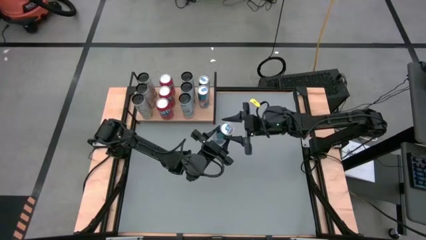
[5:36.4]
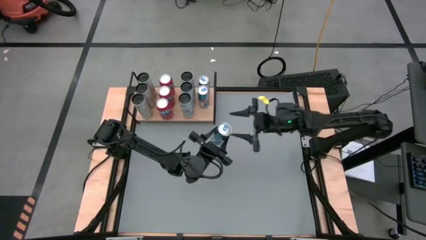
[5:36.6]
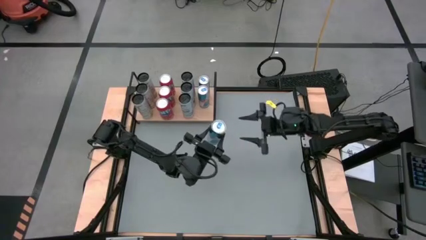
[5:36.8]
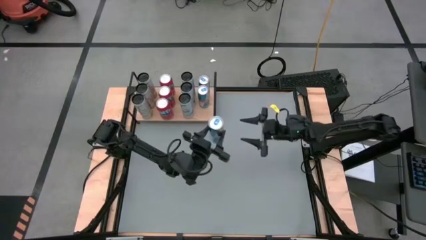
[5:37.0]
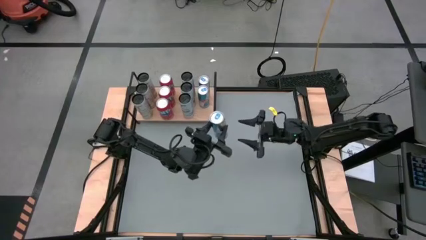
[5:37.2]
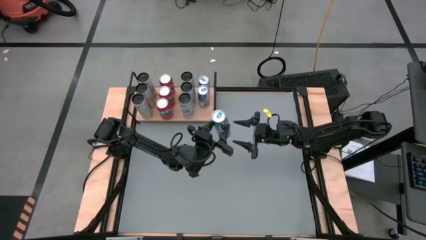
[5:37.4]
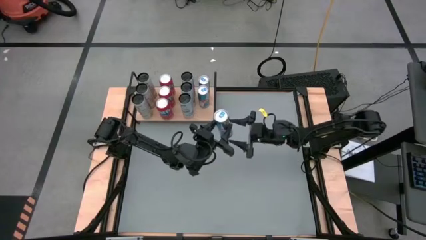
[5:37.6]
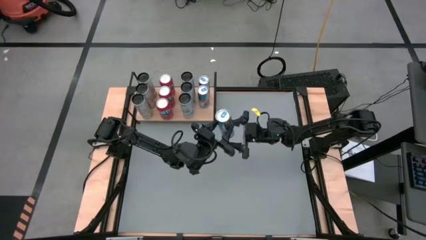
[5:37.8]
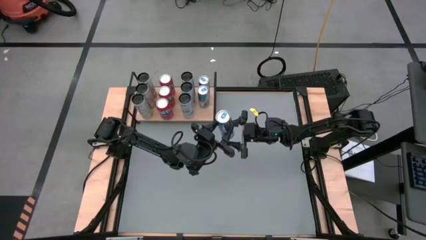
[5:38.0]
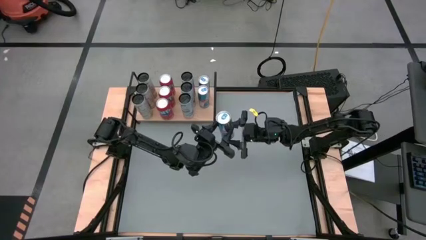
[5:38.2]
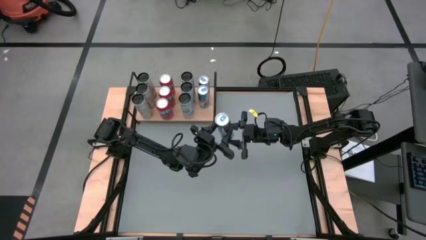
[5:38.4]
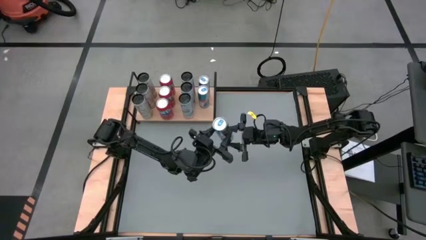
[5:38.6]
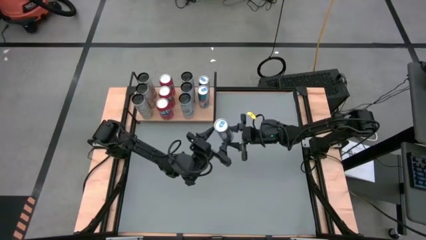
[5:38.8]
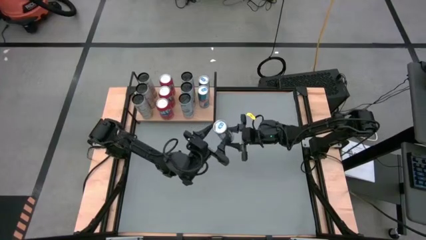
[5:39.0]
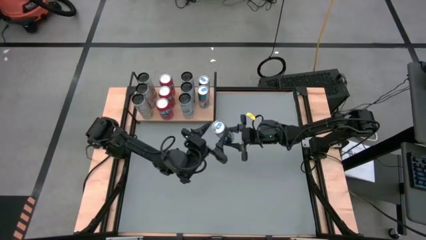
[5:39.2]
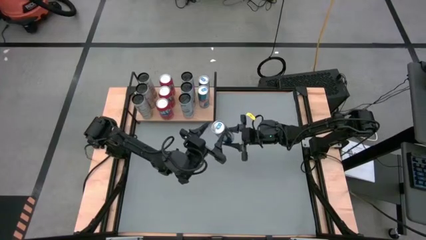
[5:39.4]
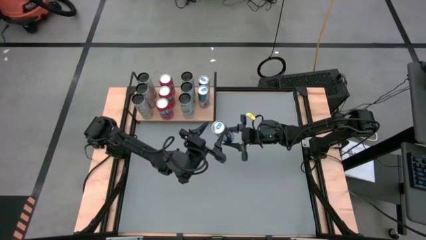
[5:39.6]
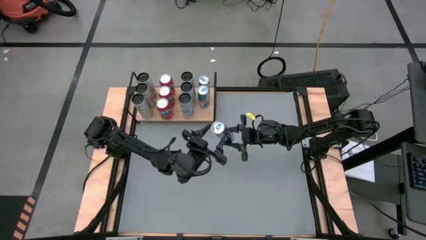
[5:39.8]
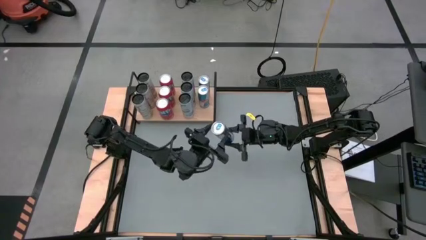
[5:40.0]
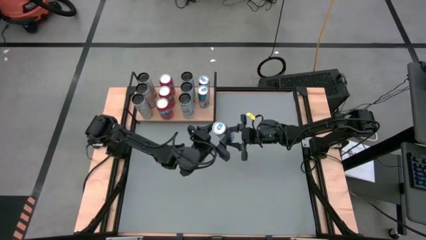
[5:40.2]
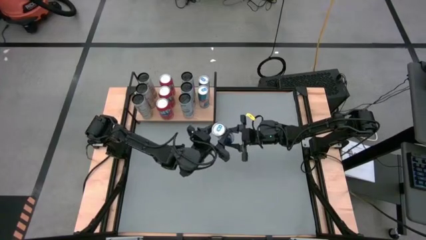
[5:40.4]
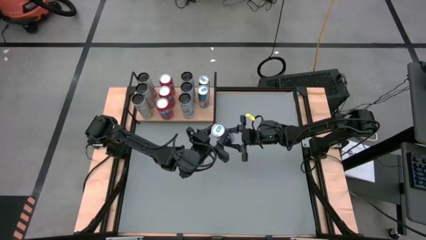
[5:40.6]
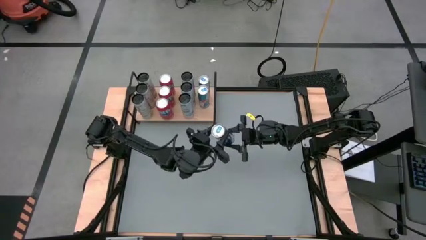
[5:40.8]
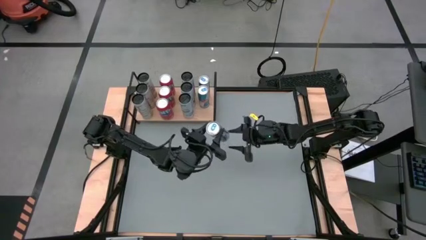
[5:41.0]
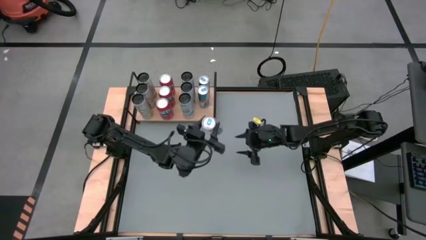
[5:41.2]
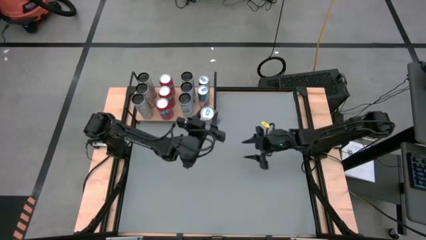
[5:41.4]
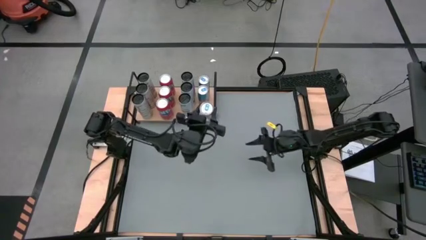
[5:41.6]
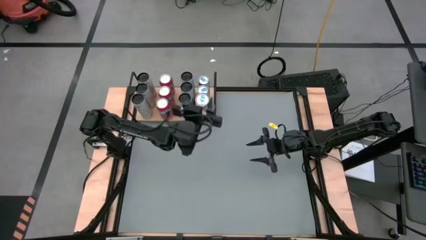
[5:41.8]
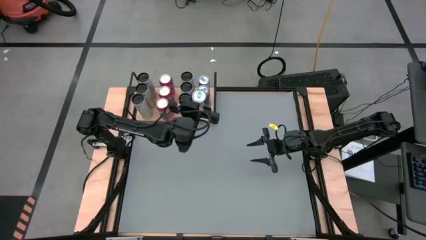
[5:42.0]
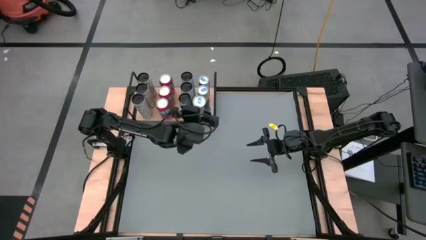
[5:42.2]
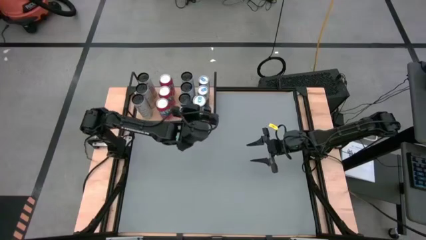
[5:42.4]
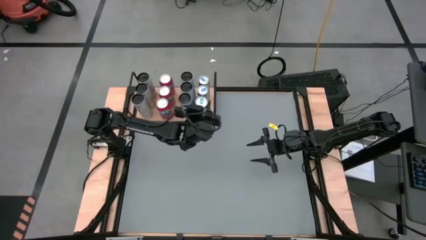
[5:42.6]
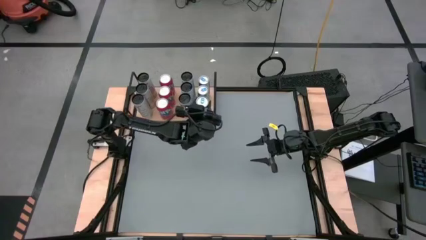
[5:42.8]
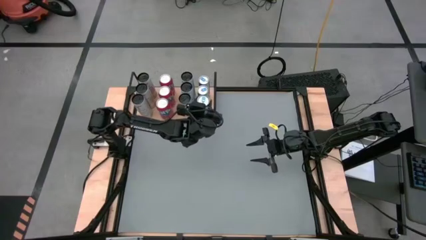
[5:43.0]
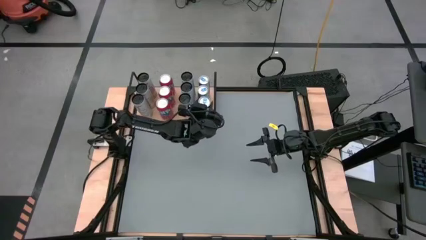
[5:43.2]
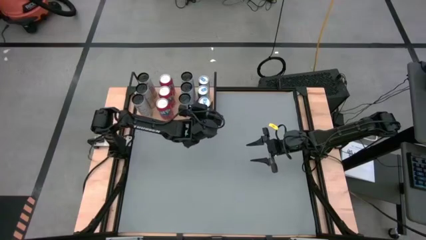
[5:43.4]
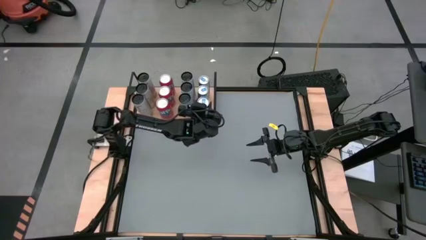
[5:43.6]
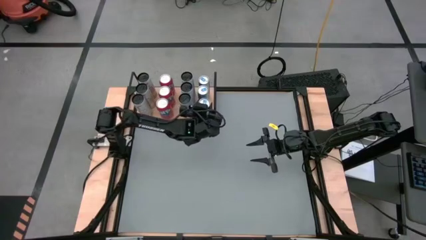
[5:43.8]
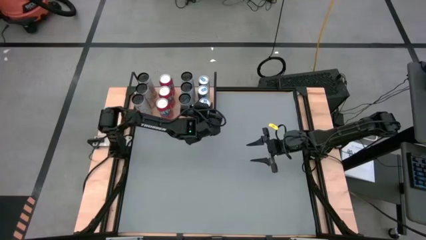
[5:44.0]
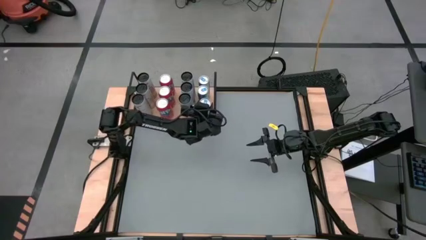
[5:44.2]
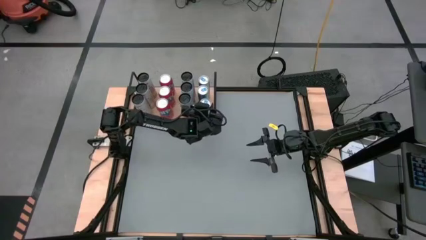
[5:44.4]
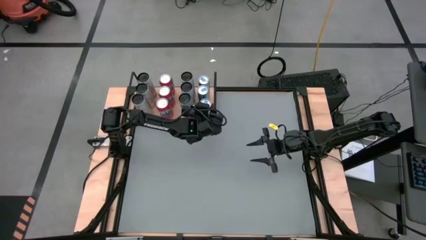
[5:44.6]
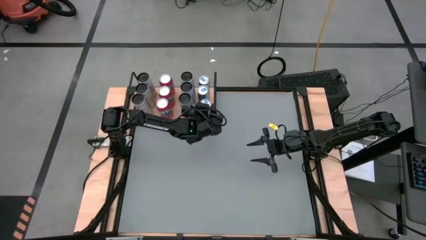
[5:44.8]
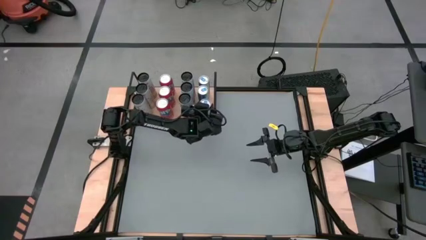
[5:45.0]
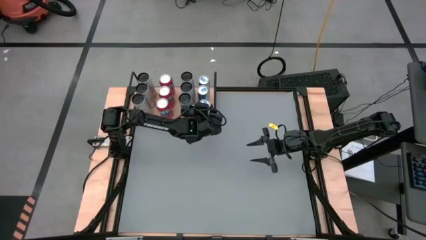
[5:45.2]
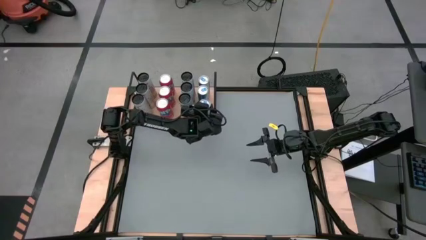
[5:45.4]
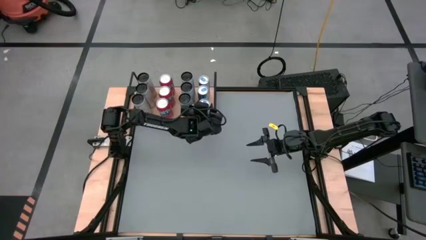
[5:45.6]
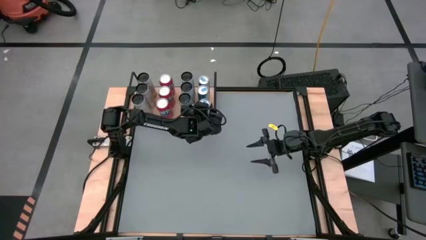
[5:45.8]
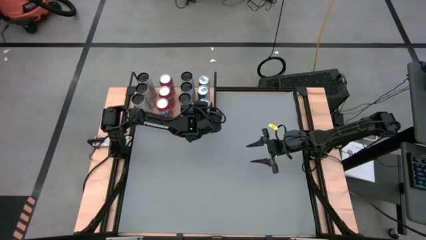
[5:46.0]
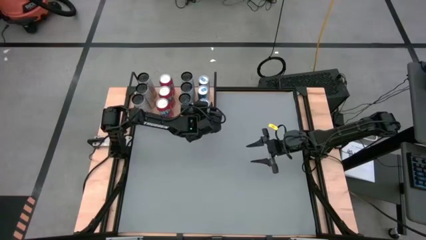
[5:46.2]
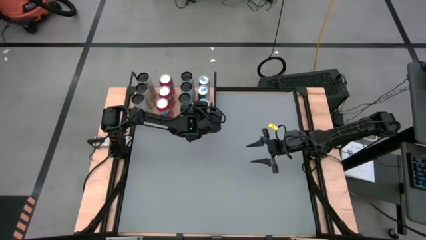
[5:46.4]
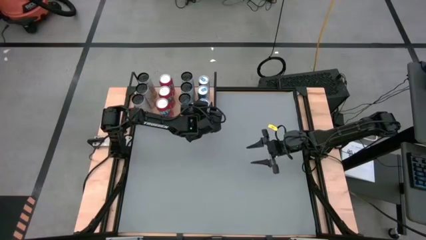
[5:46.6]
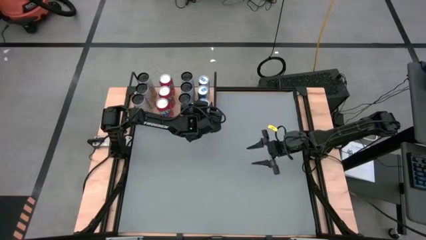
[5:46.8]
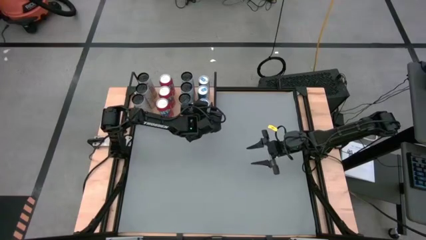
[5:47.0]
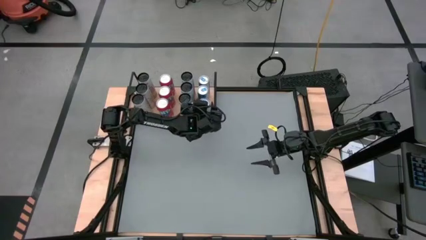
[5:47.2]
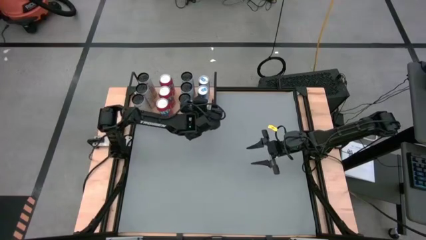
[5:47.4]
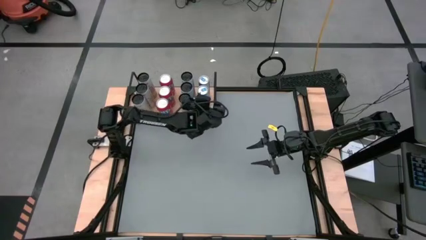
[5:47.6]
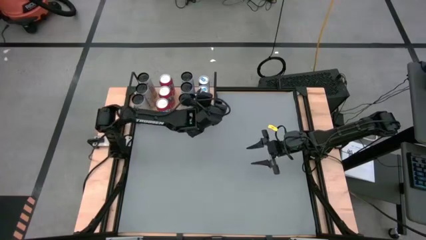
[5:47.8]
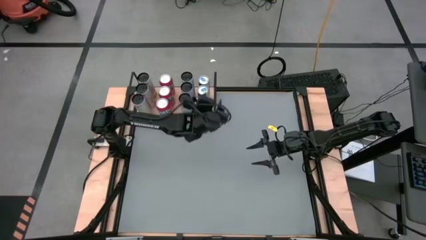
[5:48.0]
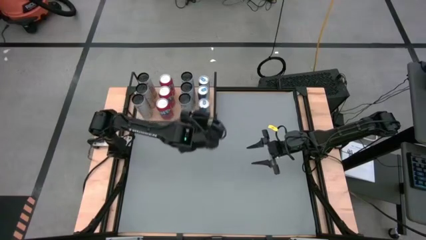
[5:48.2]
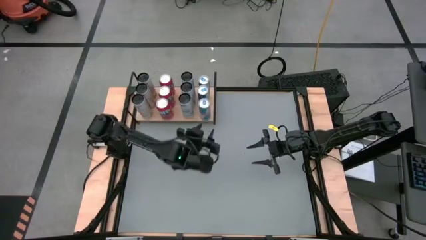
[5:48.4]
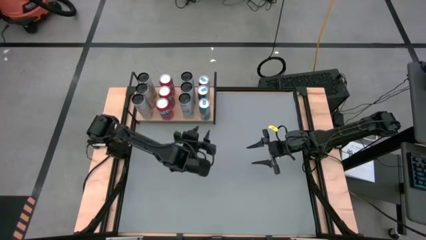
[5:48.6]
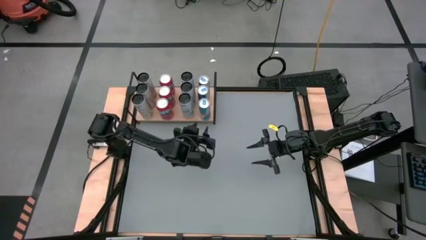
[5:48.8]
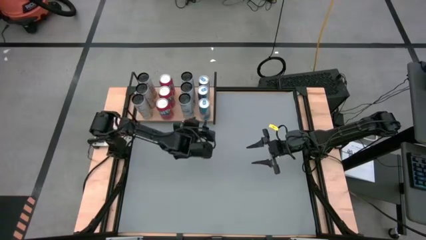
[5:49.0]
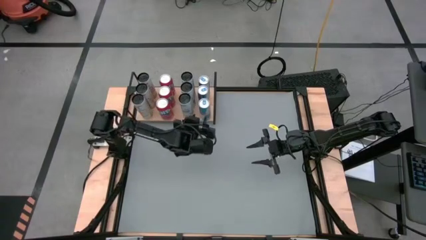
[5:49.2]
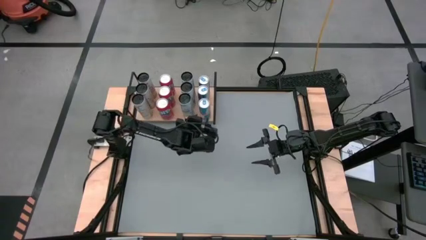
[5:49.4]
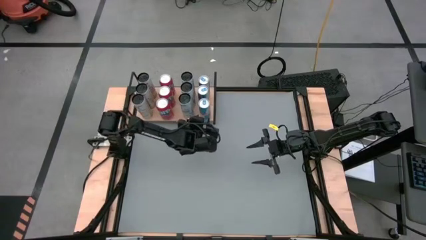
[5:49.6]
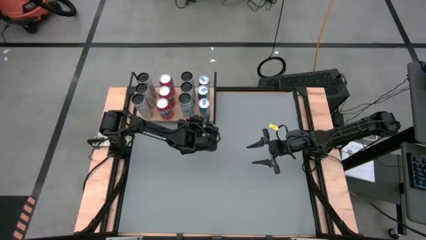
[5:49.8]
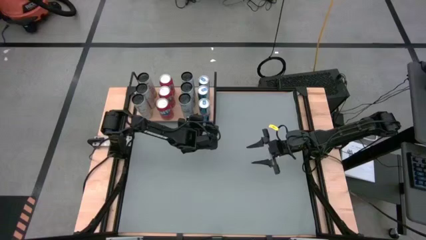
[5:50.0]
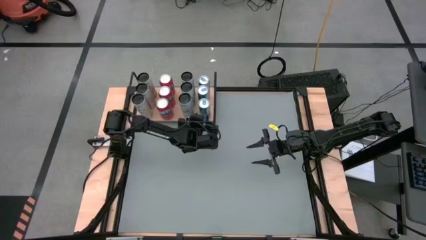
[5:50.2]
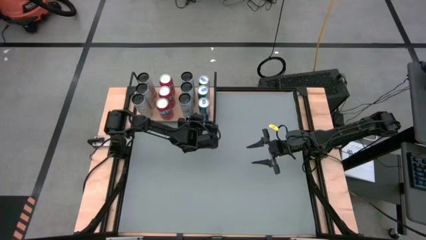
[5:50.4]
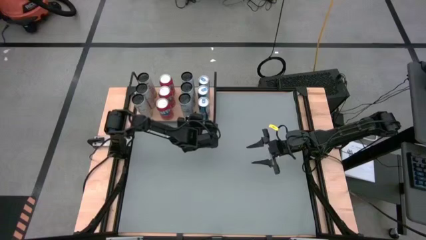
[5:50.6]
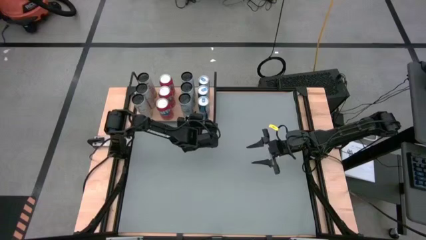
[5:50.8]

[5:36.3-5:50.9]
Task: Place canned beverage on shelf
Put the blue soda can on the shelf aligned with the other blue soda can
